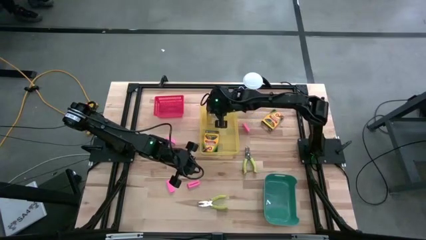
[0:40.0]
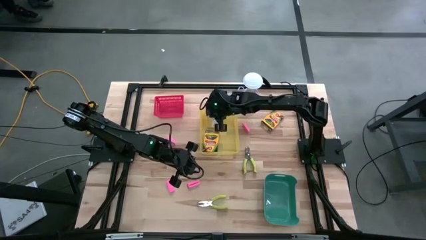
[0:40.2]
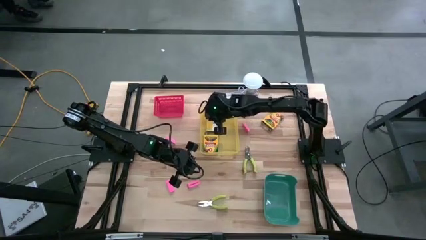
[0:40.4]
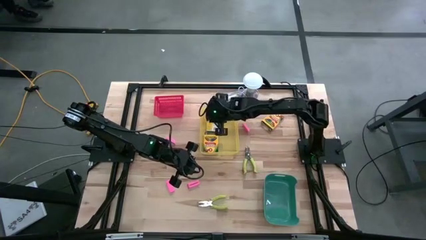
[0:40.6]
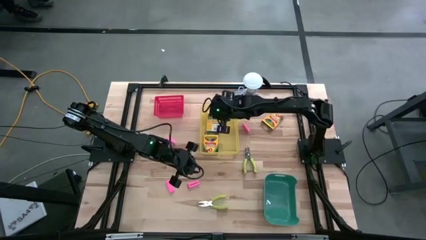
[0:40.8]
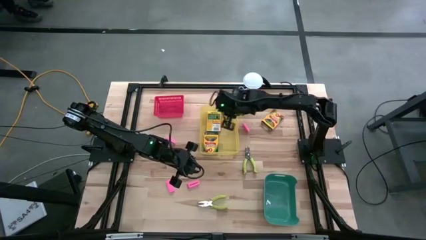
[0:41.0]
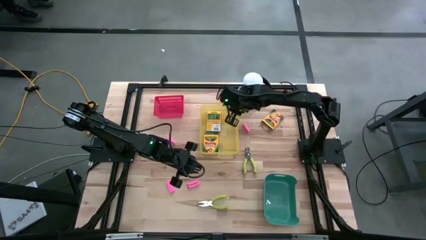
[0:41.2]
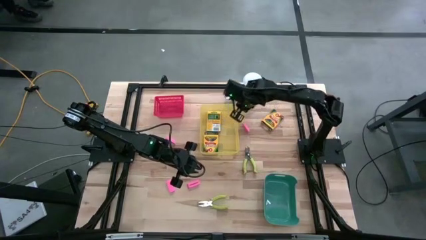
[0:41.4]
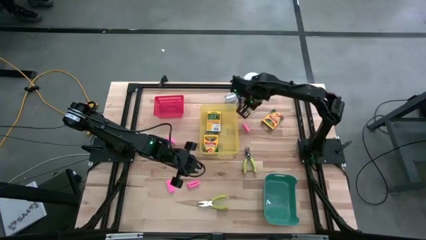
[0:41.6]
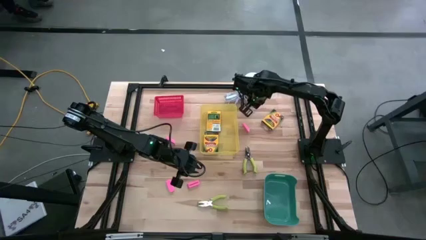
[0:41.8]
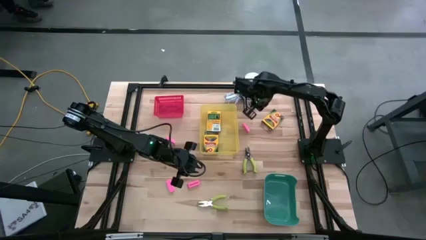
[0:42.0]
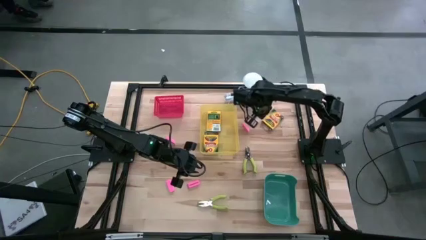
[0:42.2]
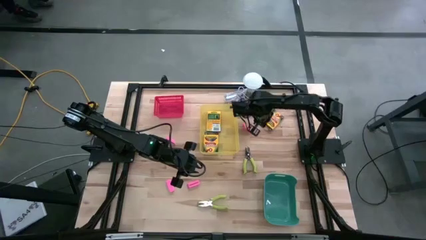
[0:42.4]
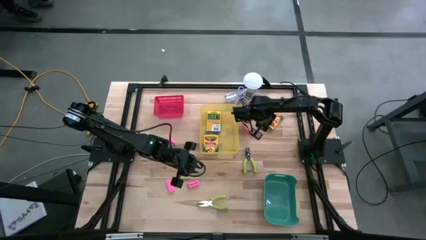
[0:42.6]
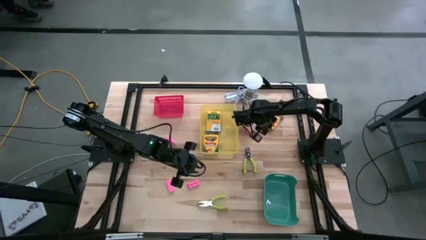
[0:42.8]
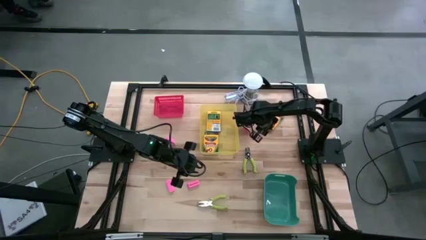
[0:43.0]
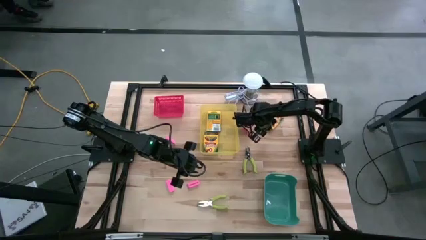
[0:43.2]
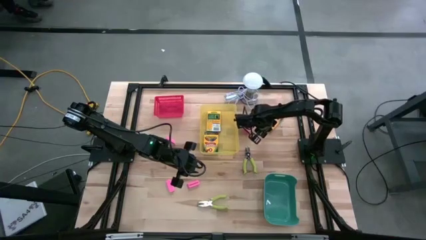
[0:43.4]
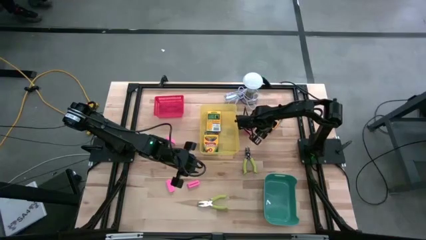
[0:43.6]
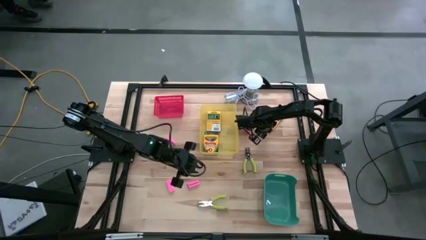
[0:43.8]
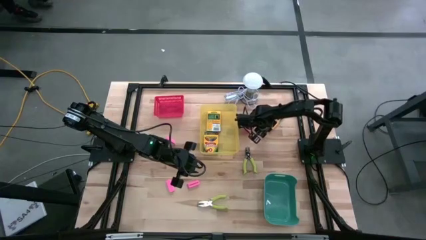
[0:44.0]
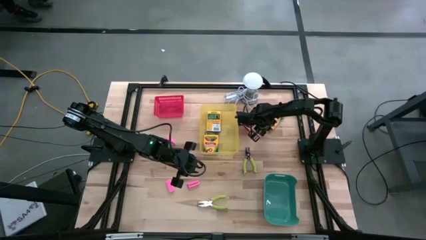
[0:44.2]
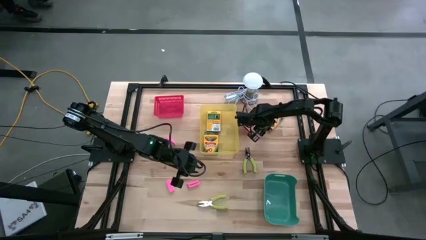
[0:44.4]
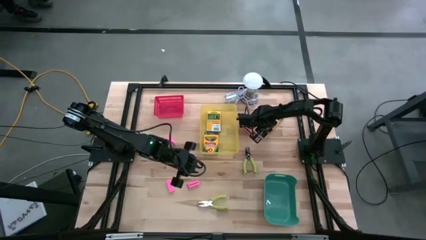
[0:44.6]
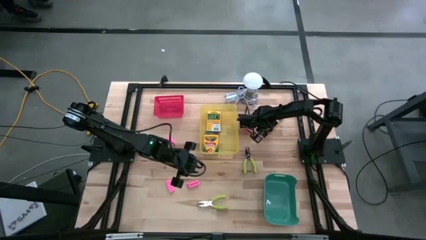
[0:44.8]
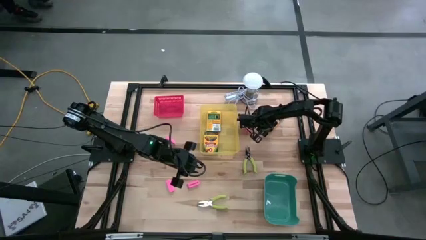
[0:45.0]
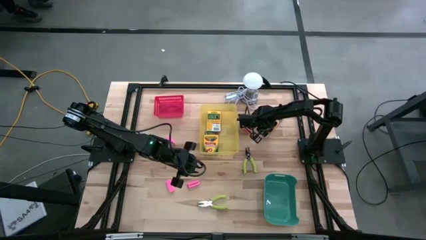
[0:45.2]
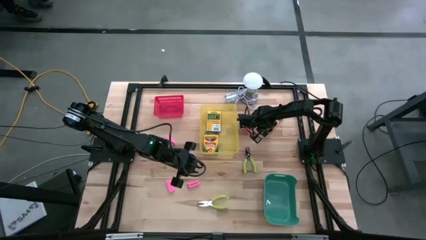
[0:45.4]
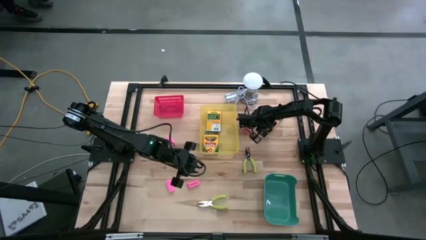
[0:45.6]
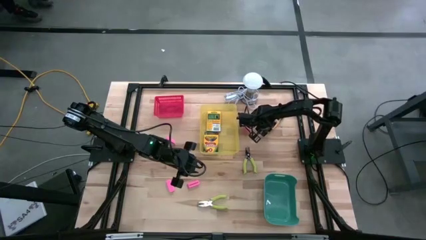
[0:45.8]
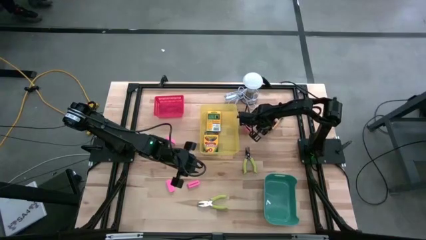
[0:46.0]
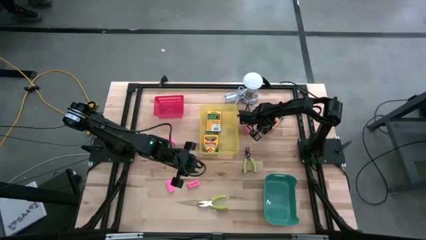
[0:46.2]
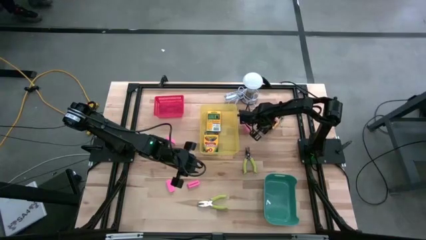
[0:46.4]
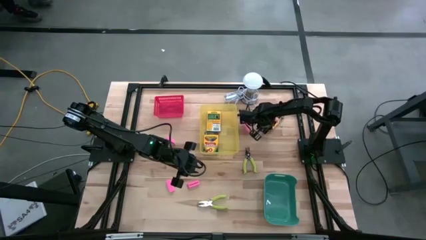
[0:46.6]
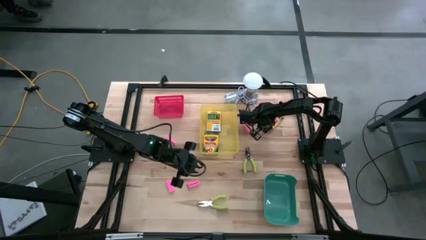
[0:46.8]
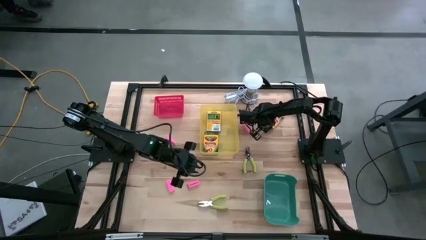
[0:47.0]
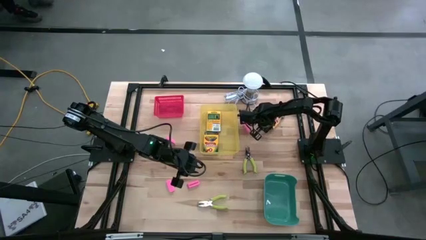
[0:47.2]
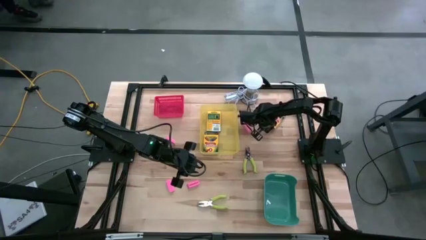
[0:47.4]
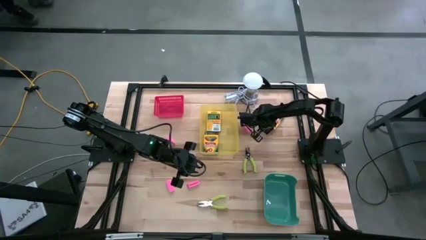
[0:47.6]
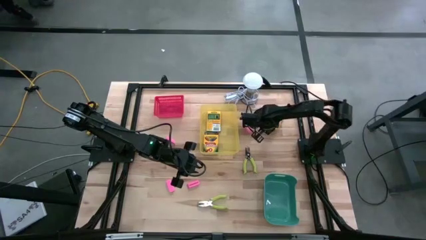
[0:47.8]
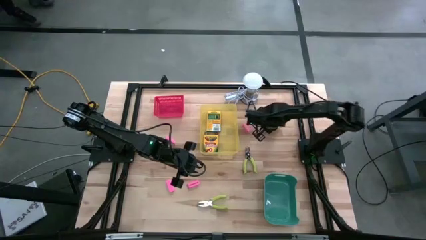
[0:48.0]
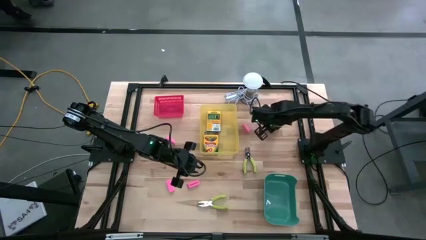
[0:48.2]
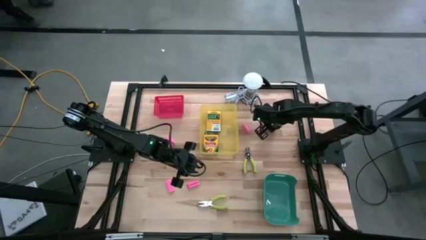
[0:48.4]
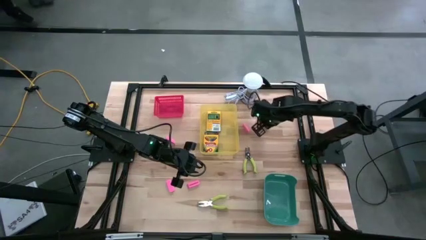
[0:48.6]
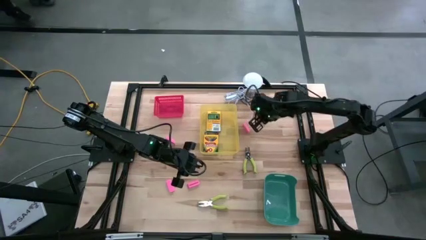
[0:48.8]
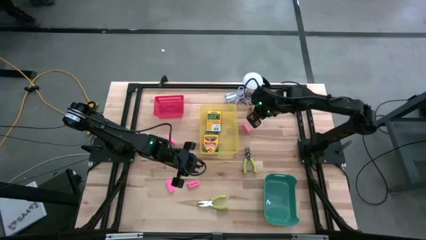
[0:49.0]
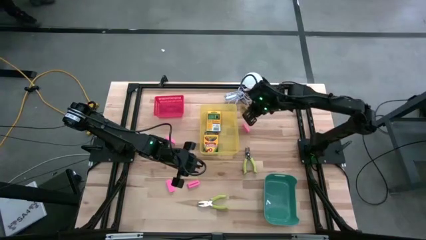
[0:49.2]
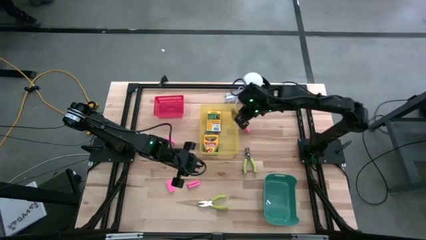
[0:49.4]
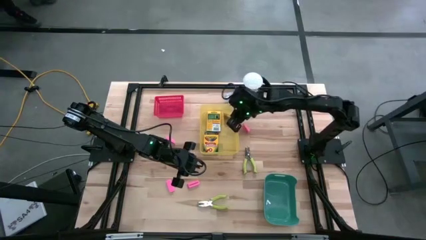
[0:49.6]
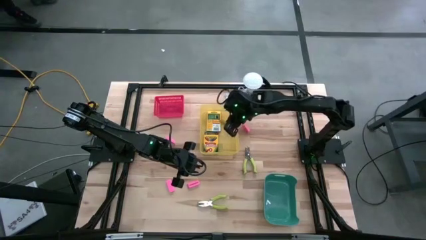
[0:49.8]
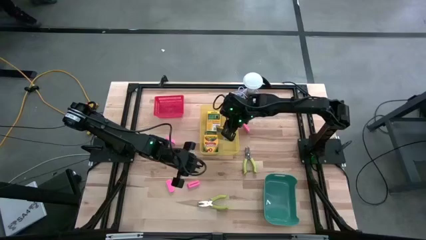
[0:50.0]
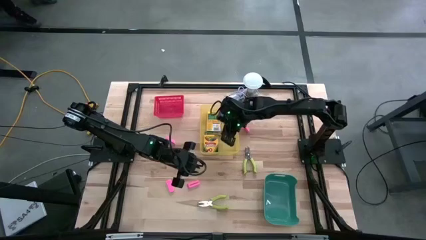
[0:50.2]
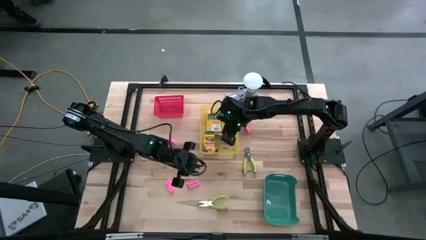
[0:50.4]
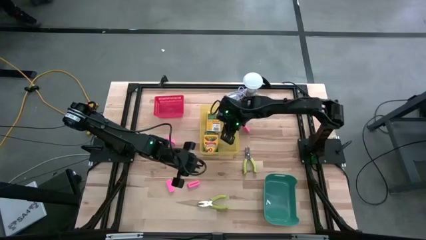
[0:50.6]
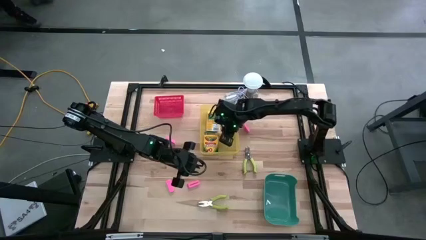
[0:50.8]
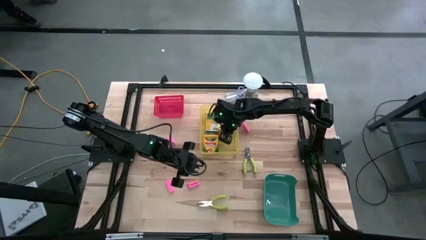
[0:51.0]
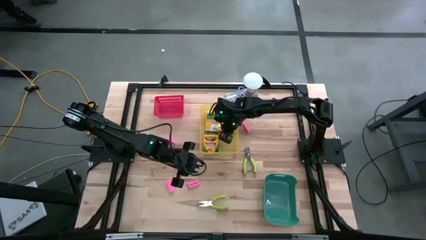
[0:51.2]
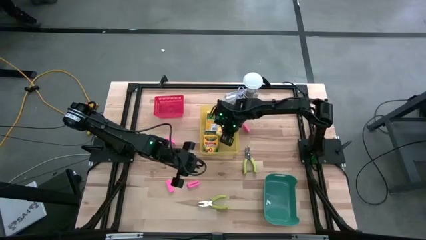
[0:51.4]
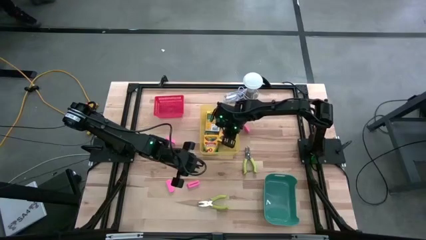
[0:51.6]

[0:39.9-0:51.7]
Task: Pick & Place School Supplies
Put the yellow crayon box into the yellow bin

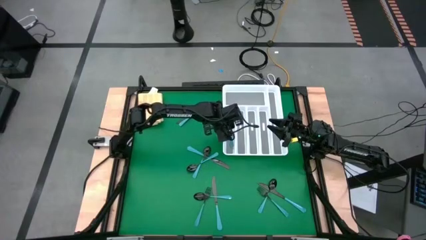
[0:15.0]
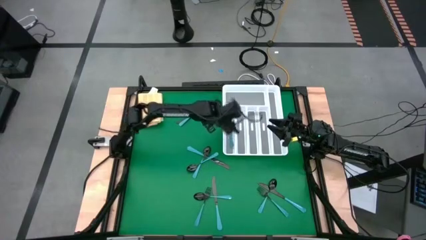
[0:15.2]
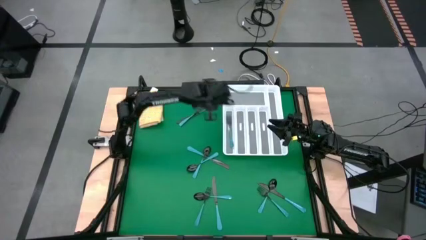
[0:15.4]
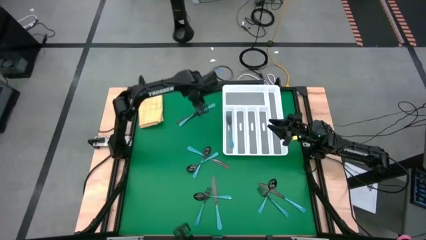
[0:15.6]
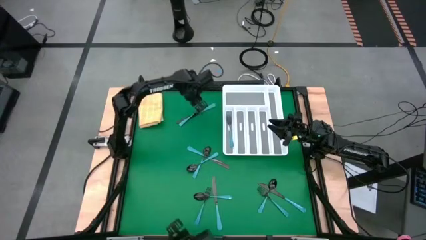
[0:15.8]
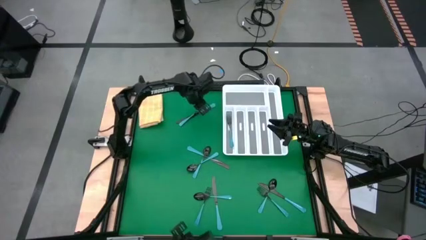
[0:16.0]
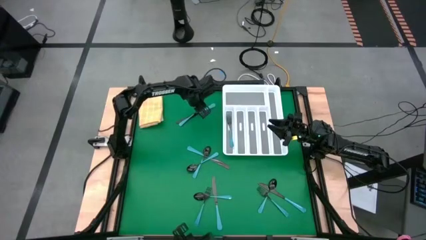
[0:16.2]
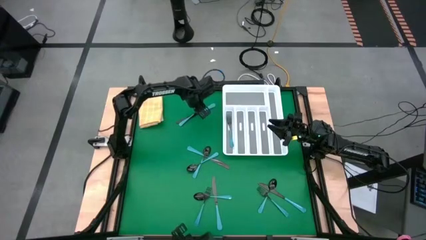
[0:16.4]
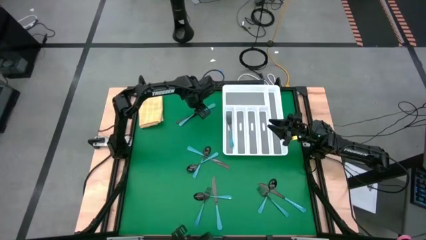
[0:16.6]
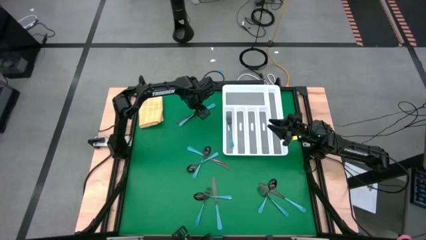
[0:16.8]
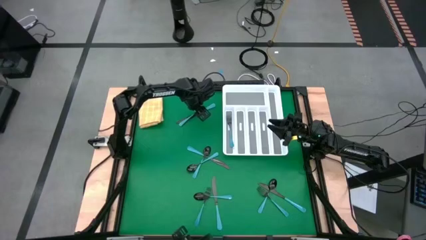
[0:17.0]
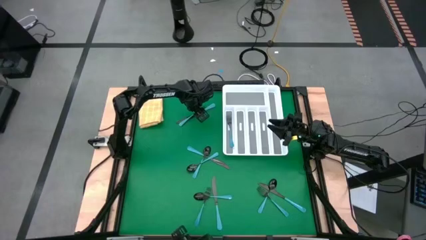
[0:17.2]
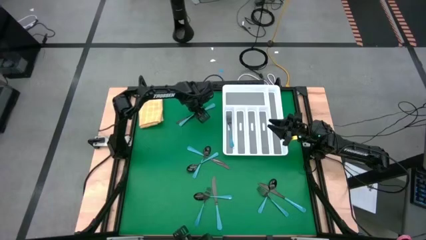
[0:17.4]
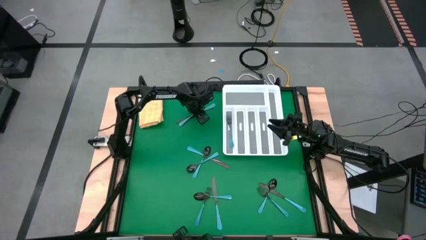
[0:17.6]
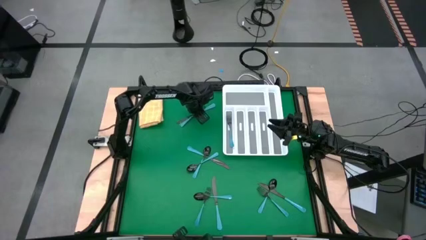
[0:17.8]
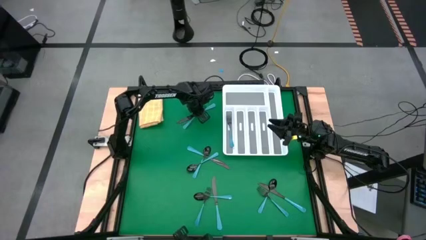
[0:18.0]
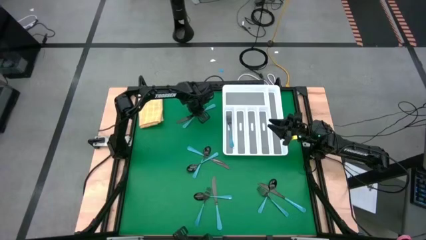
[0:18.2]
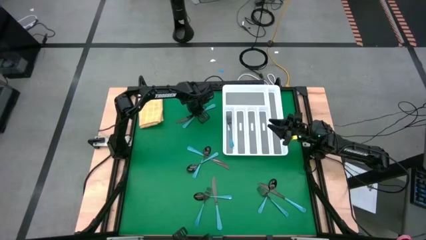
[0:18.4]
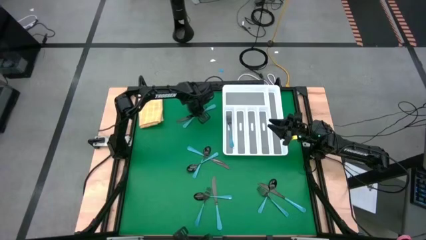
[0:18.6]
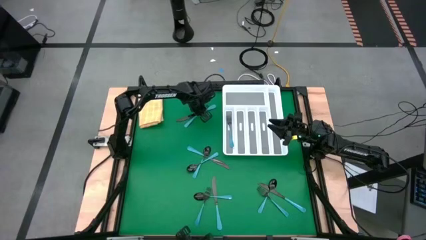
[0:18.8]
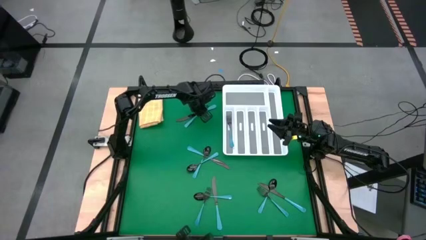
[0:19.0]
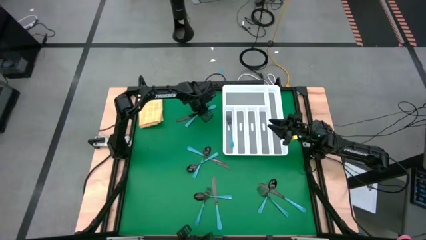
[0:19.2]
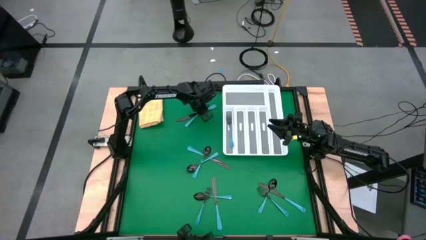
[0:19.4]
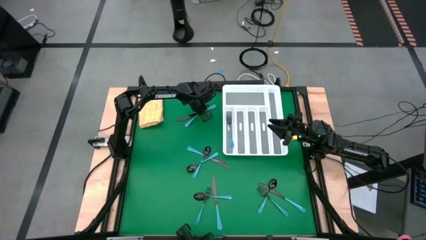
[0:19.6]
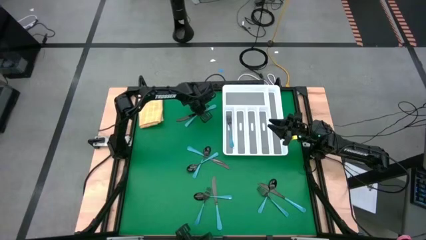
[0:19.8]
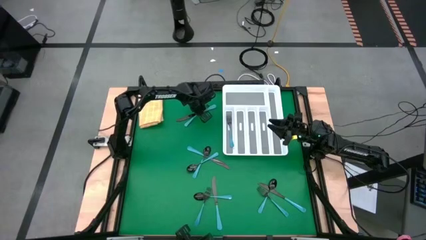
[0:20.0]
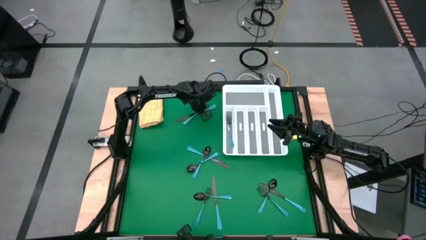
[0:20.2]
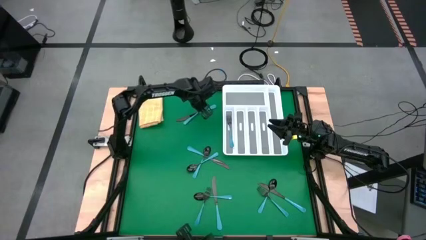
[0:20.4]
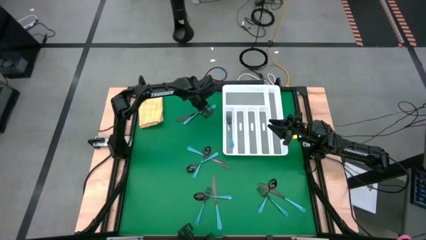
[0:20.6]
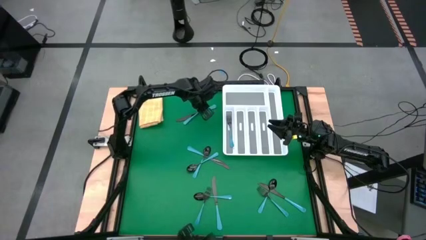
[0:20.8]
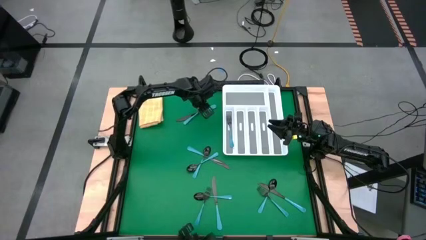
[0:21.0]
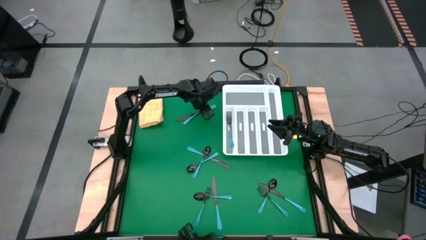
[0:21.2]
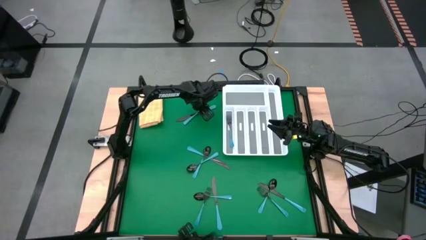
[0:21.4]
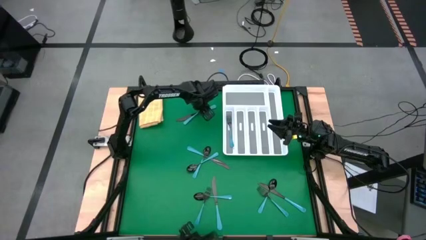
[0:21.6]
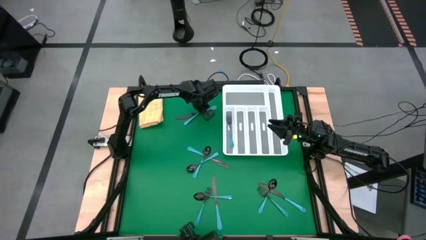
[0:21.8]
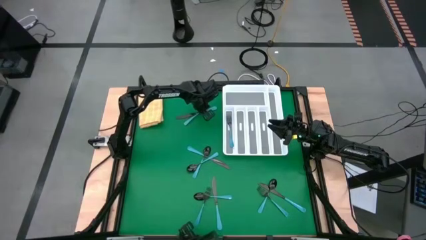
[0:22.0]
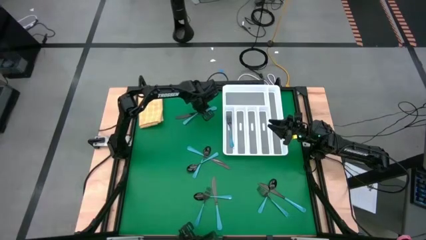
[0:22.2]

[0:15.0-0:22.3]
Task: Sort silverware
Put the blue fork into the silverware organizer
